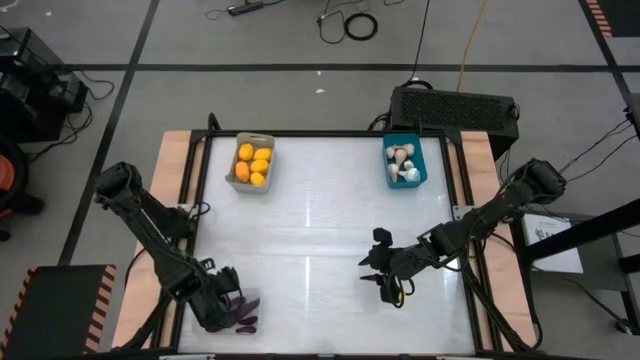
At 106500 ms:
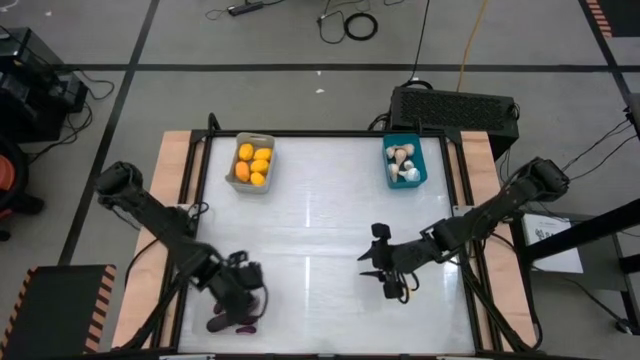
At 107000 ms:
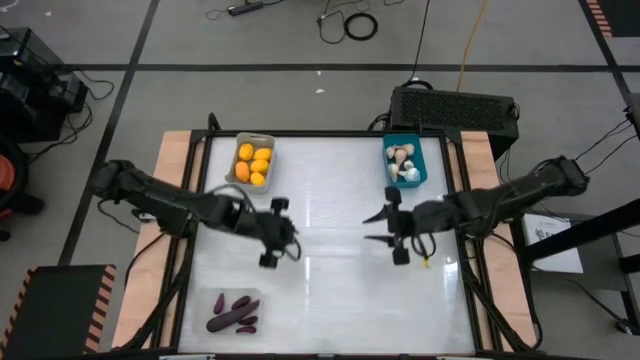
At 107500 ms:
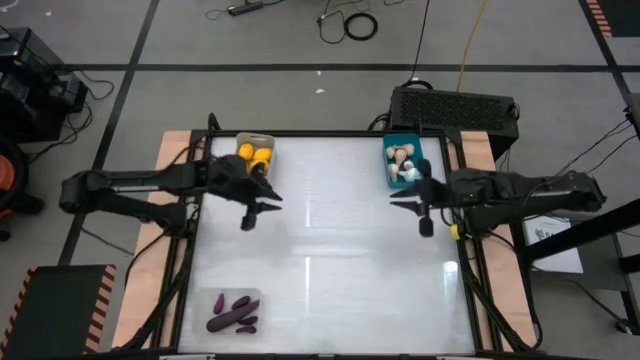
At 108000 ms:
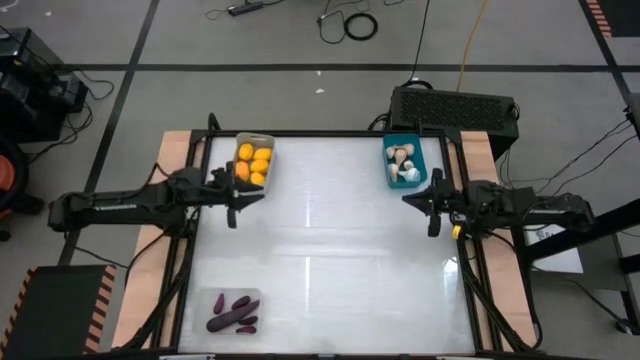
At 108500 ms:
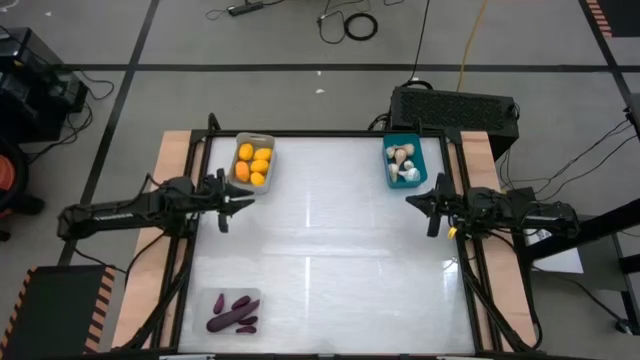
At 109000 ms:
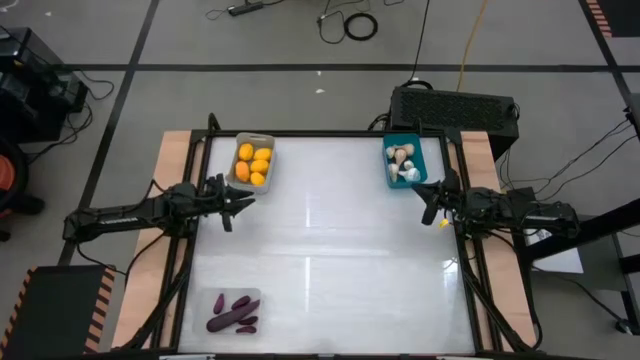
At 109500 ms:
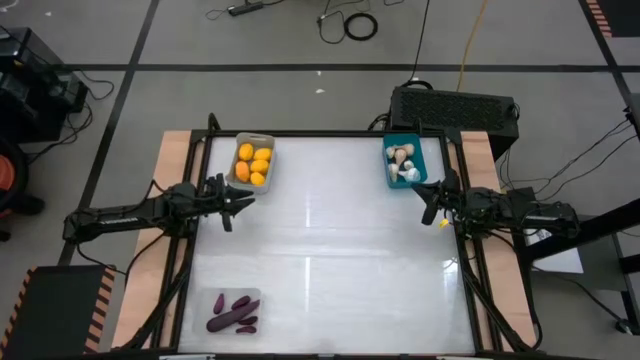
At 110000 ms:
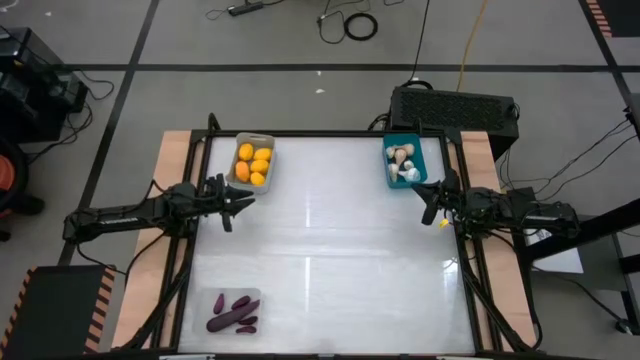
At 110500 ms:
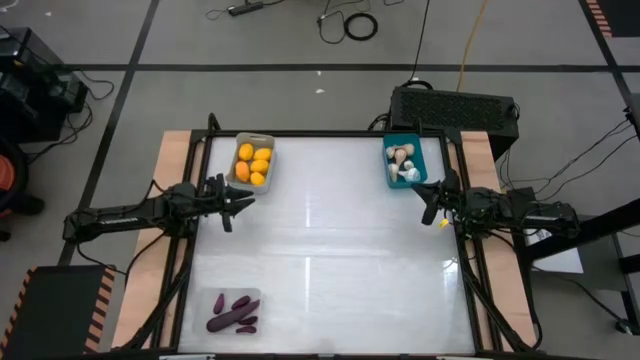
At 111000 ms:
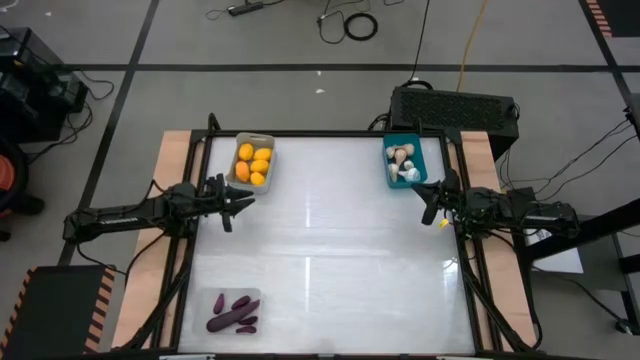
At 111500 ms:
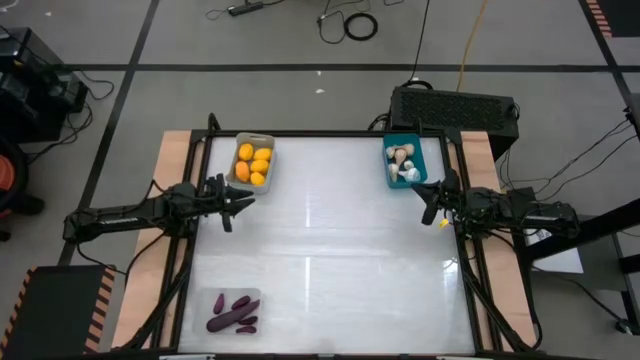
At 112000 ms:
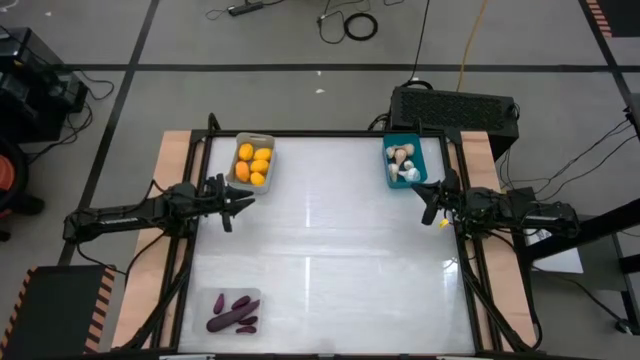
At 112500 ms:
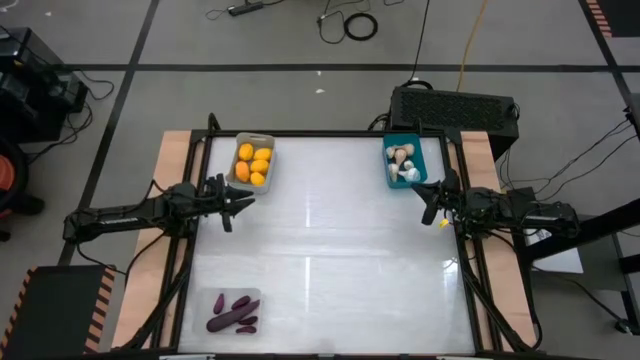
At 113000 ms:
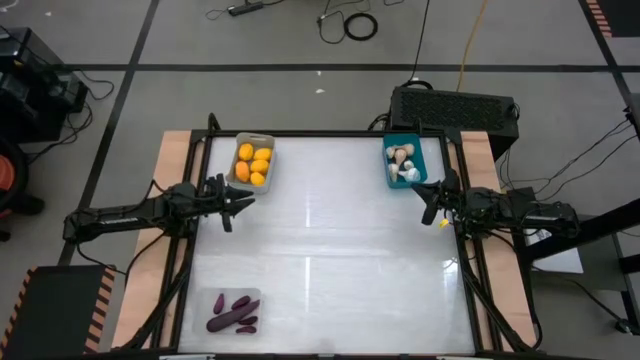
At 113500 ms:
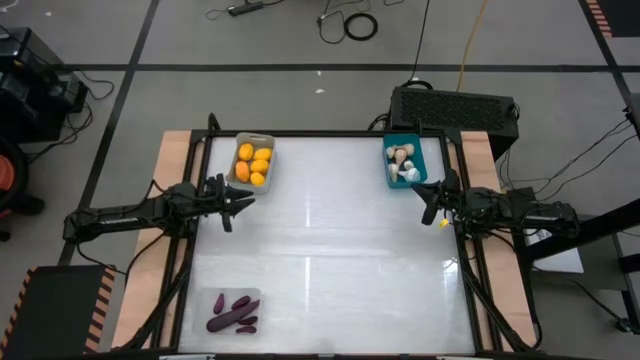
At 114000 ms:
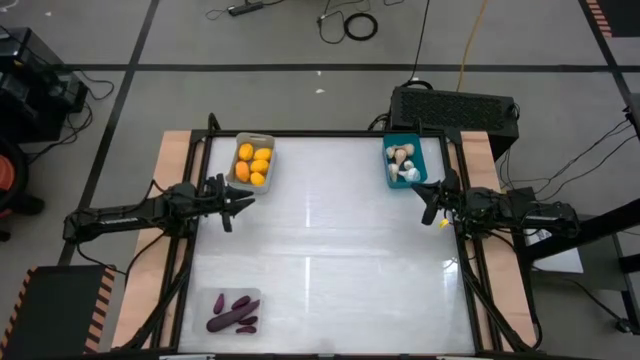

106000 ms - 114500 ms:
Task: Sort produce into baskets
Return to Home Position

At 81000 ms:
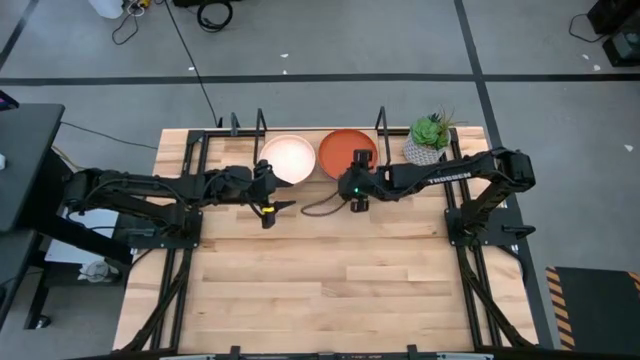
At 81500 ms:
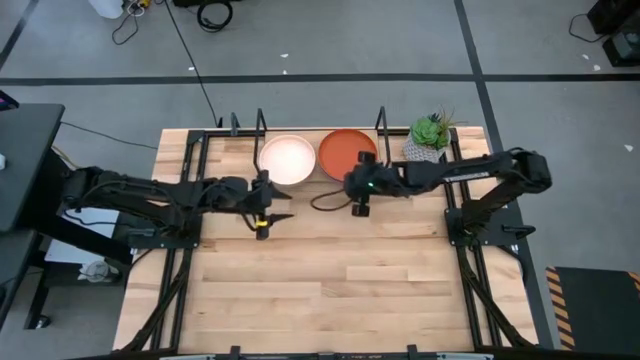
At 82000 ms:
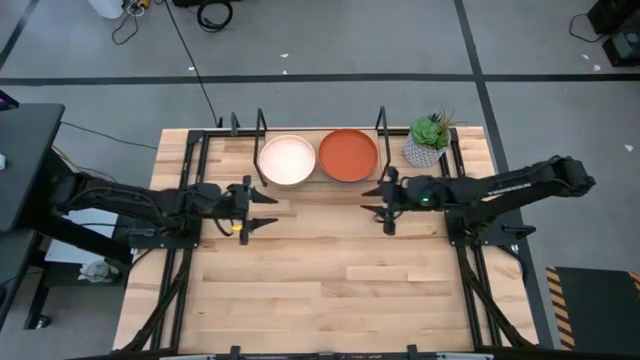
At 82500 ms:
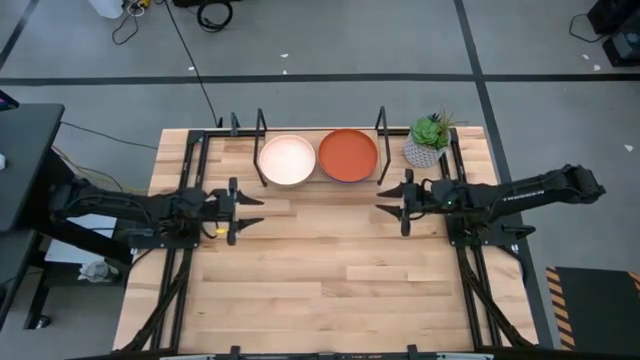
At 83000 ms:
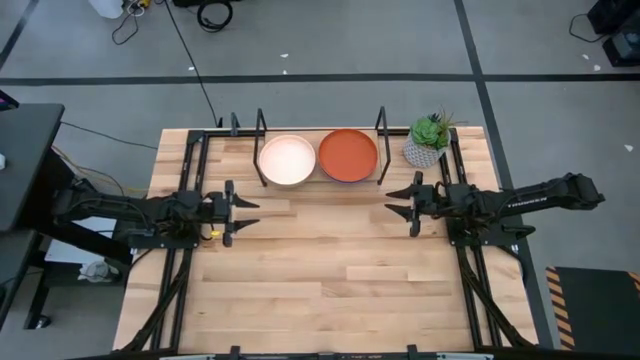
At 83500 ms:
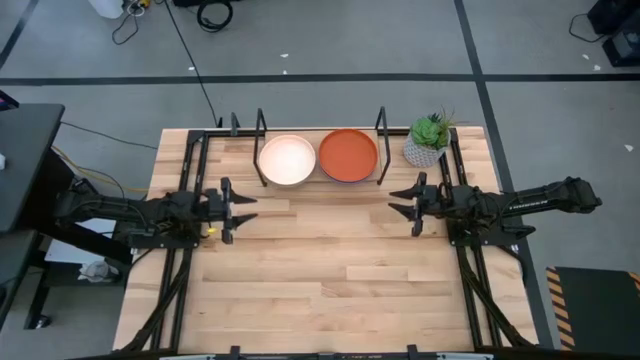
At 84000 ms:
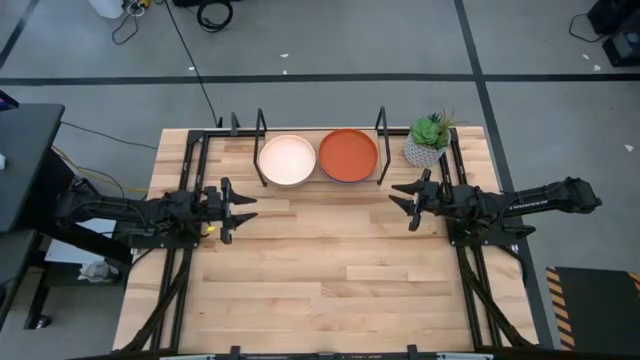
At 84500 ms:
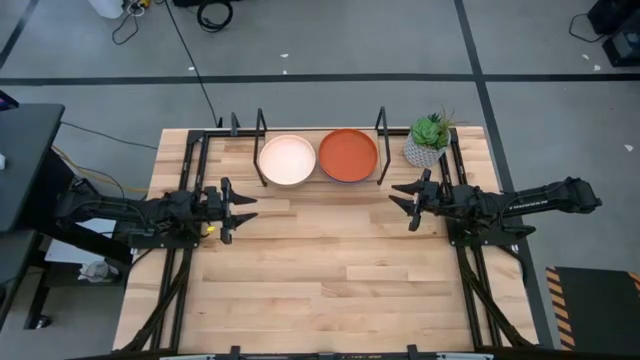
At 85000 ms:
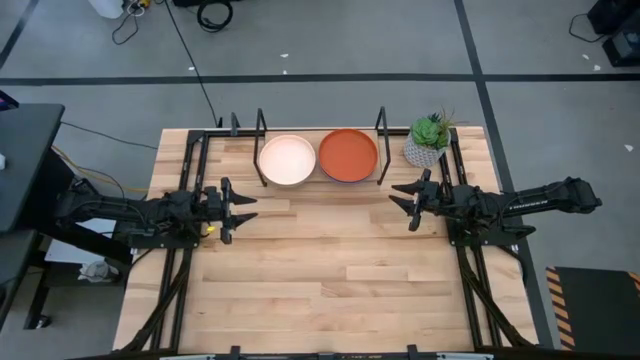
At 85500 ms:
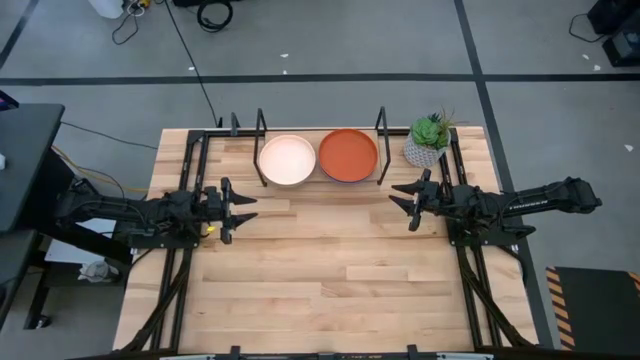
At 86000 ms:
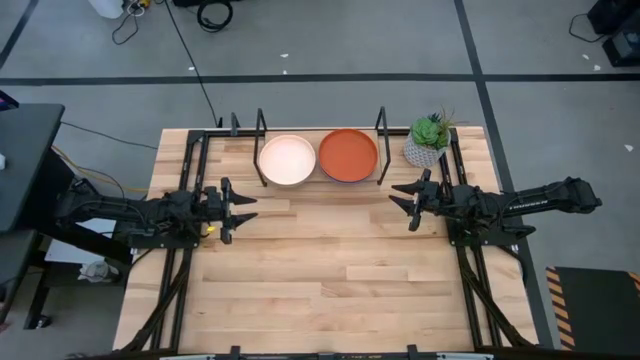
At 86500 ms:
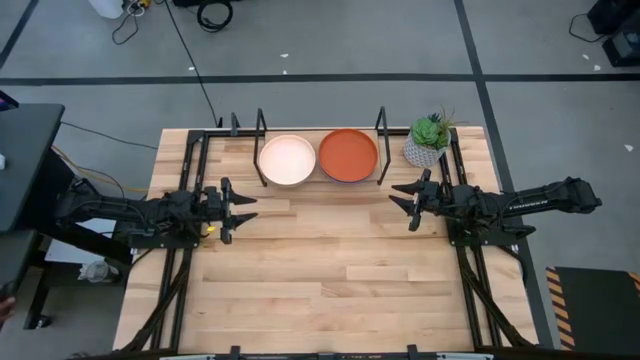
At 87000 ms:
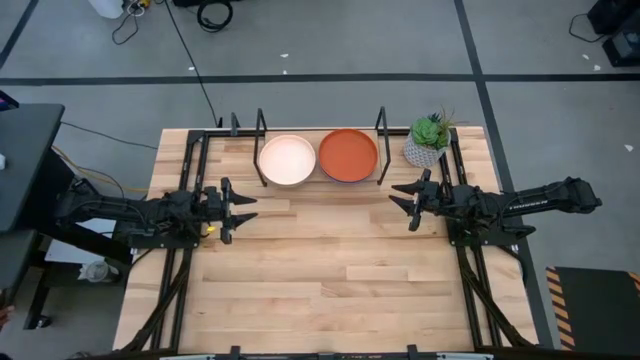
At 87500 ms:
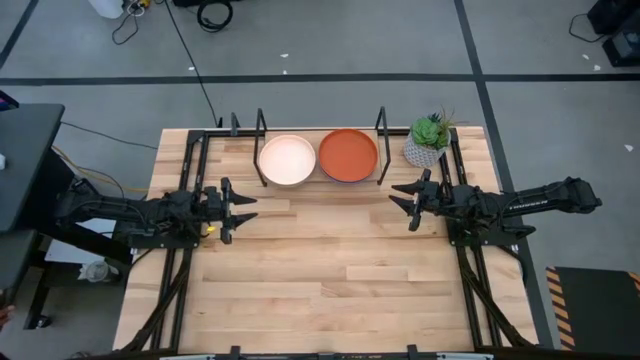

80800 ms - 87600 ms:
Task: Place and stack plates onto a shelf
Return to Home Position

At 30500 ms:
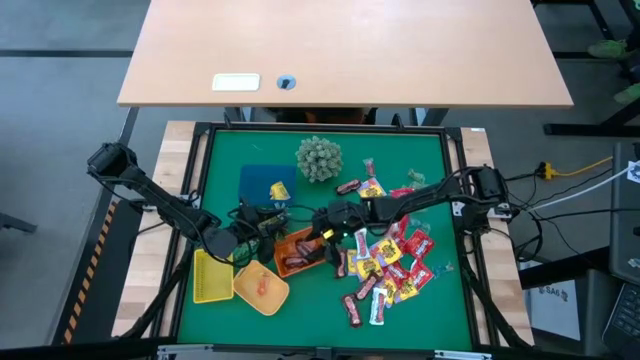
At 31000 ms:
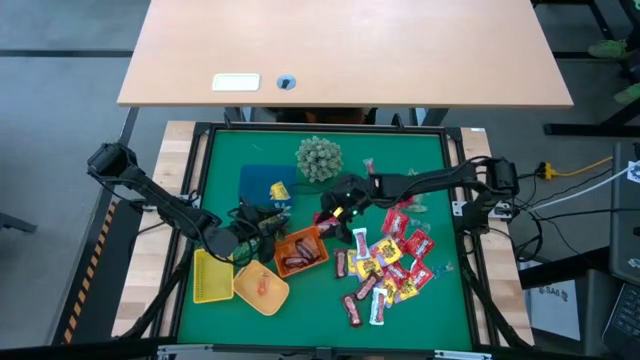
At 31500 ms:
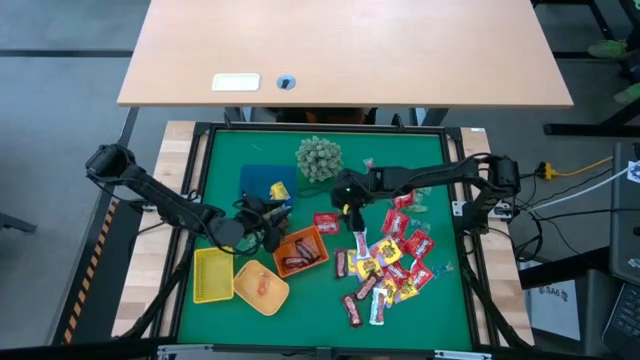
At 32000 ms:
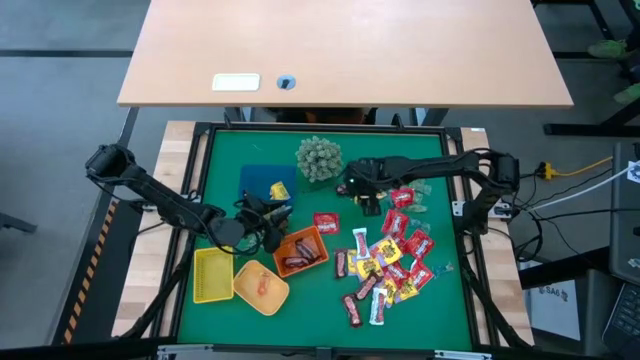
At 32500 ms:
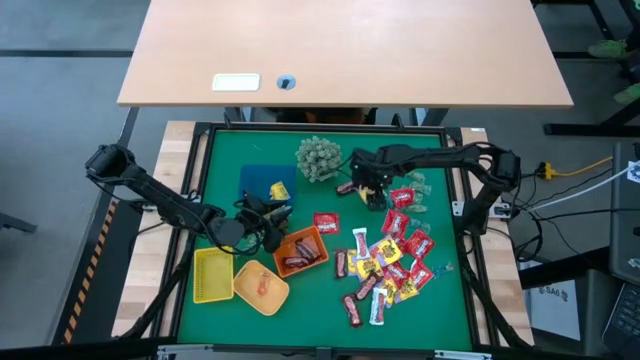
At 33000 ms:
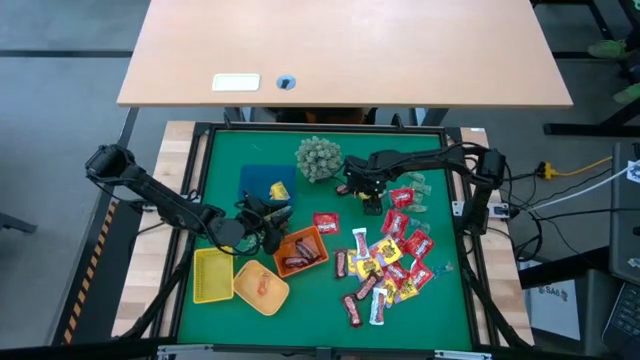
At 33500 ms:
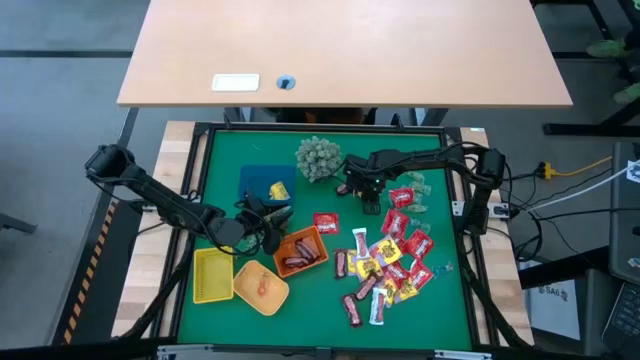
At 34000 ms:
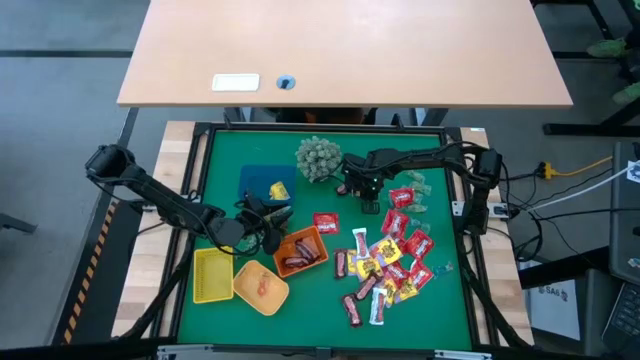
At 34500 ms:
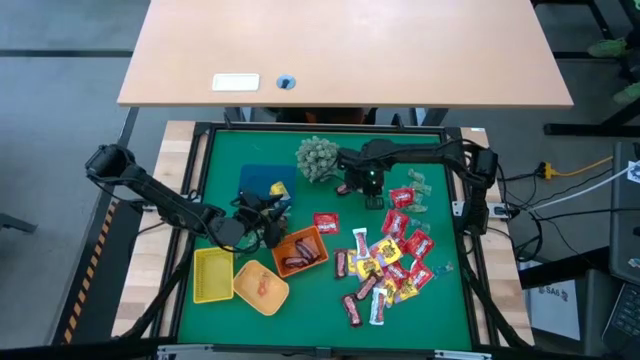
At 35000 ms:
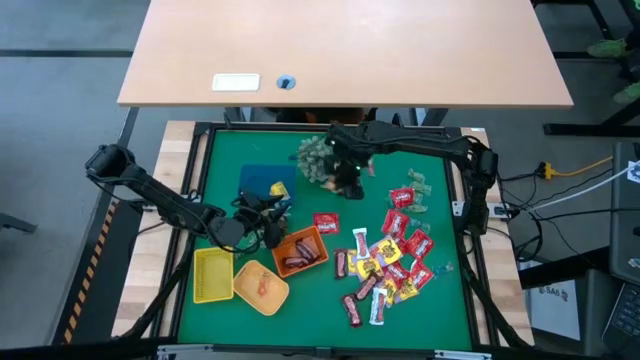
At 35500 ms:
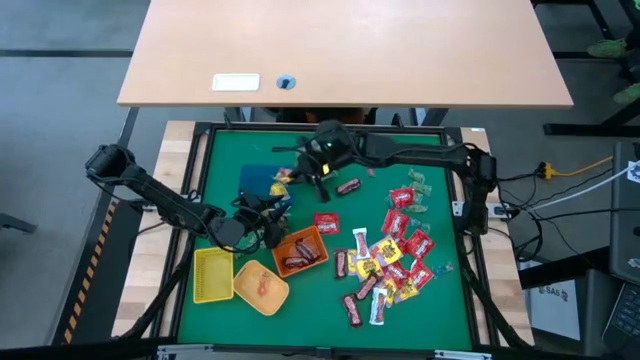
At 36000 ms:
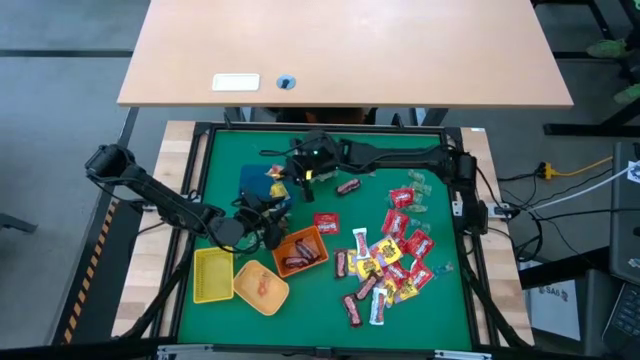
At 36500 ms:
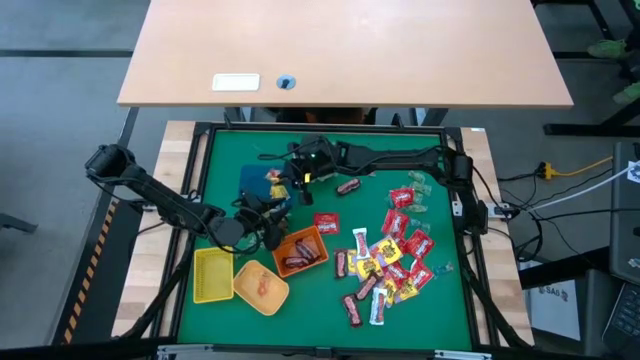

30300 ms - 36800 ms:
Task: Sort candy
Put the yellow candy into the blue bin
